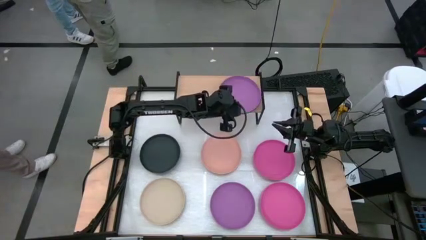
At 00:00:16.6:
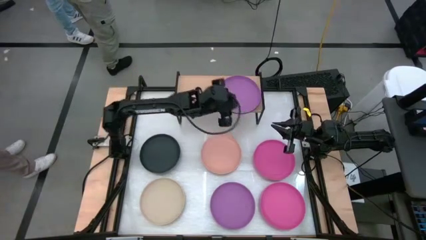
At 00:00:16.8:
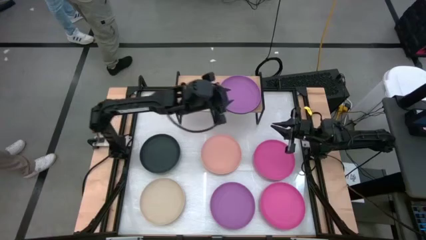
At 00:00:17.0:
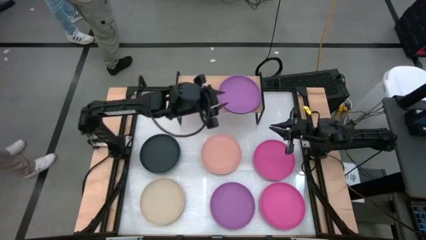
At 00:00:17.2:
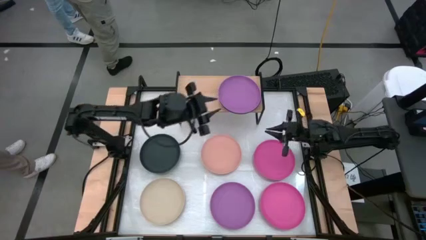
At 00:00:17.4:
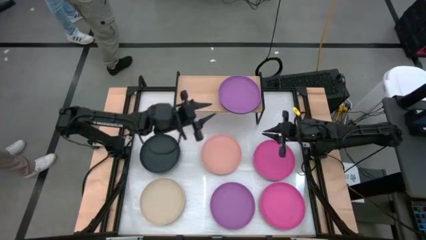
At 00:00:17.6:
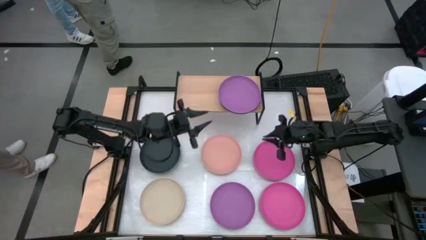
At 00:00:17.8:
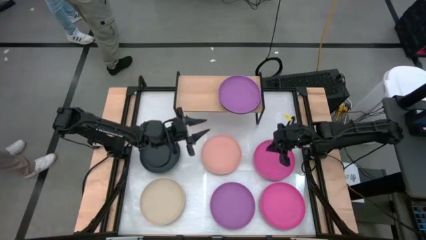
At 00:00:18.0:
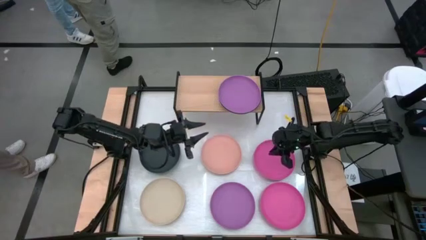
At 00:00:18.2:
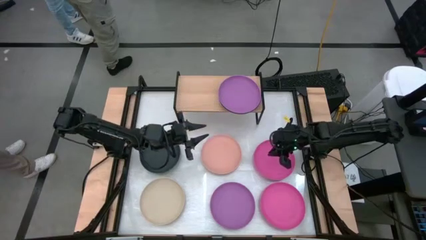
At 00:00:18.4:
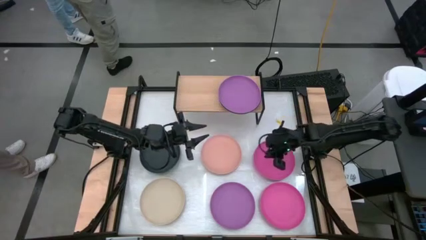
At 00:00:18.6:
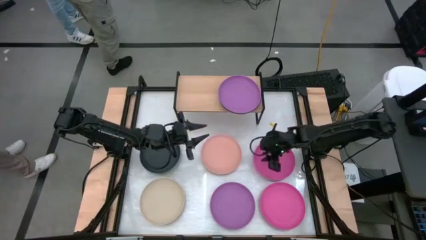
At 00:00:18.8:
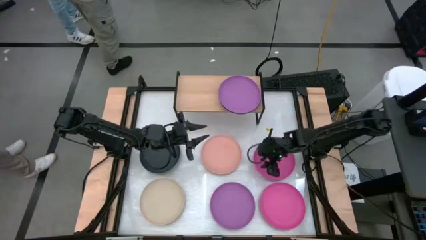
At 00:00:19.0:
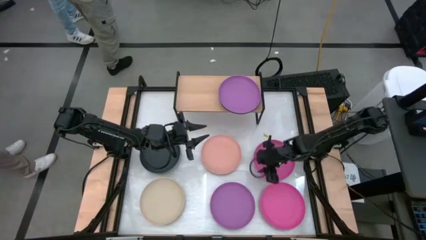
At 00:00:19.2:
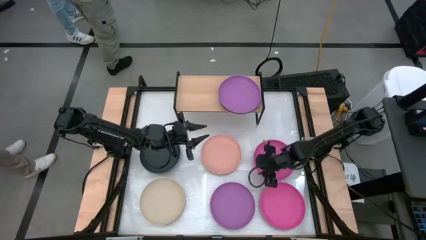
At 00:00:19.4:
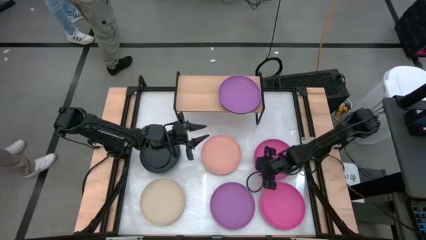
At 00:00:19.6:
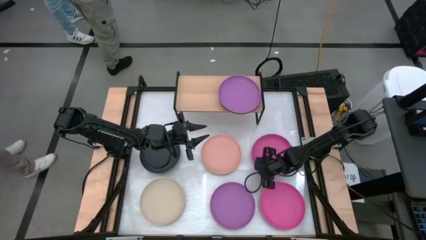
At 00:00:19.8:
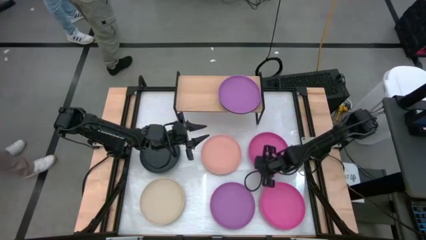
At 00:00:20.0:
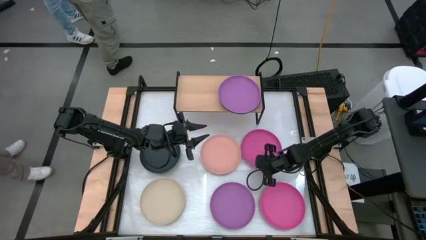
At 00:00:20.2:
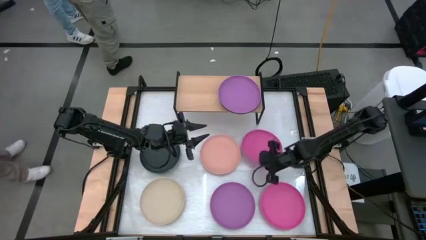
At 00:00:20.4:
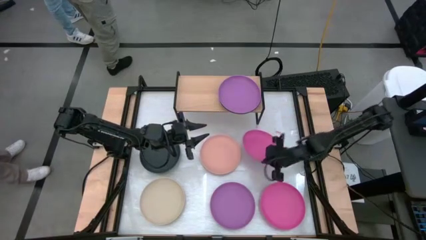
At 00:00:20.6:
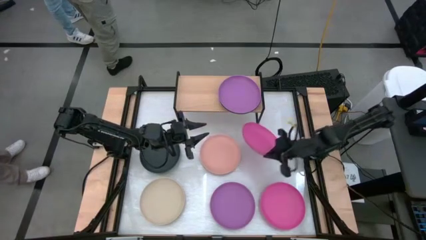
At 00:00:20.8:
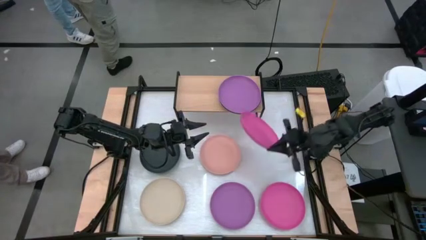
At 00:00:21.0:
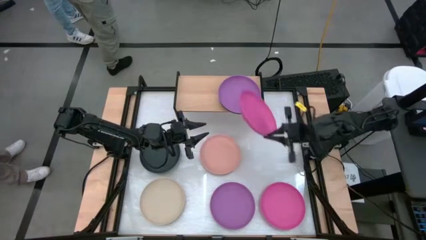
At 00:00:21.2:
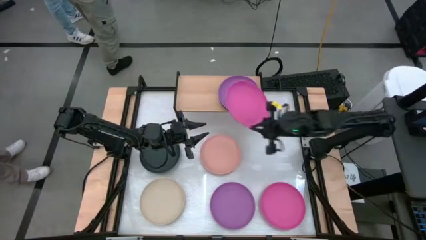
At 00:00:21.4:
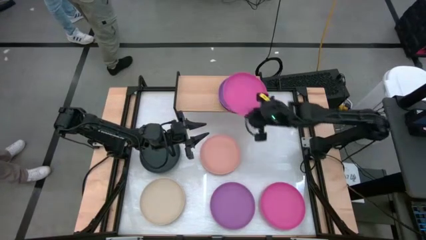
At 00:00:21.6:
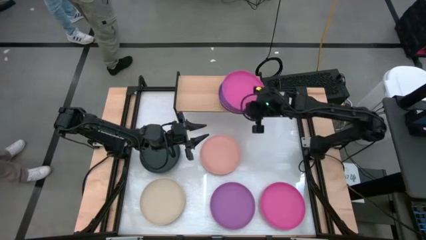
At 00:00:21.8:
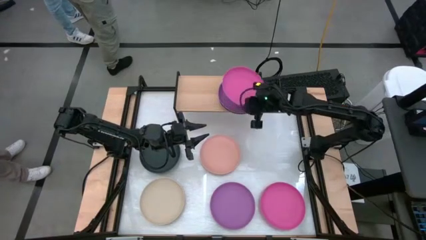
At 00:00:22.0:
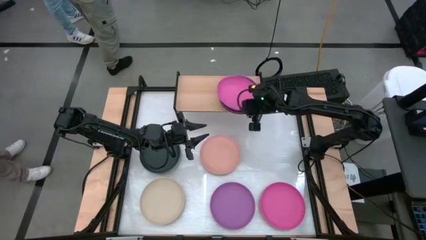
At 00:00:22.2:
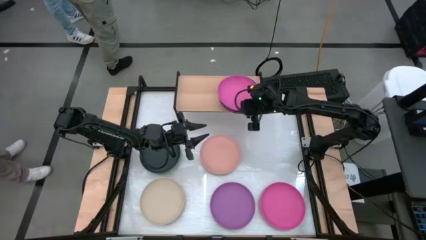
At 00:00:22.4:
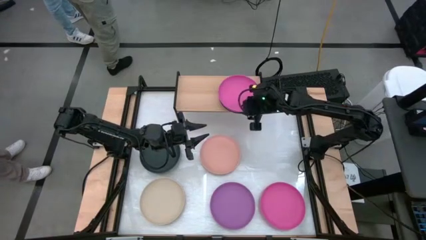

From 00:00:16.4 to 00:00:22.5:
Task: Place and stack plates onto a shelf
Stack the top pink plate on top of the purple plate on the shelf

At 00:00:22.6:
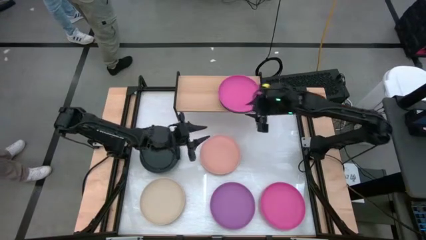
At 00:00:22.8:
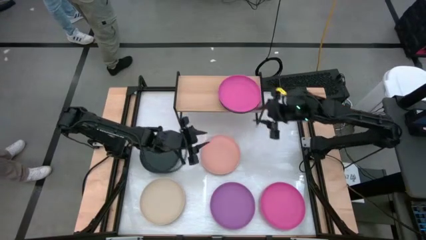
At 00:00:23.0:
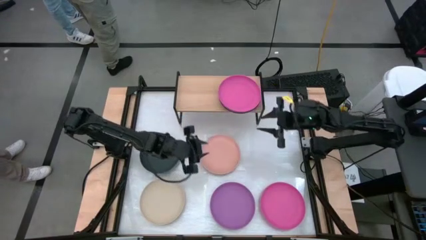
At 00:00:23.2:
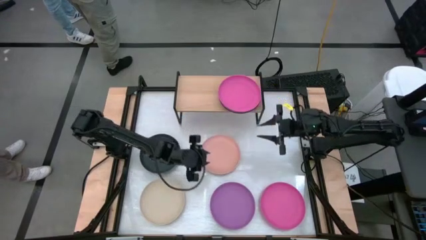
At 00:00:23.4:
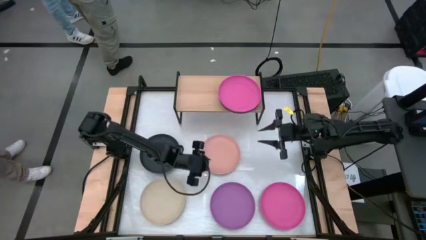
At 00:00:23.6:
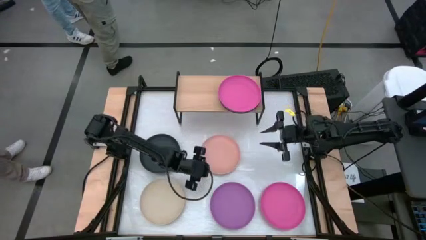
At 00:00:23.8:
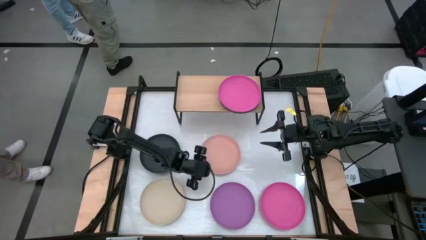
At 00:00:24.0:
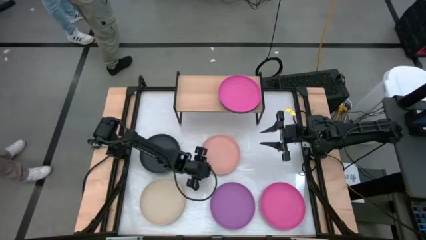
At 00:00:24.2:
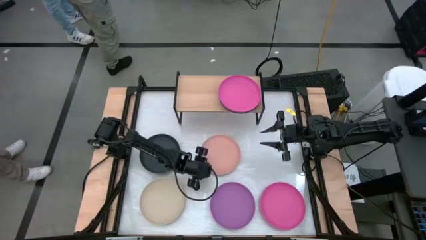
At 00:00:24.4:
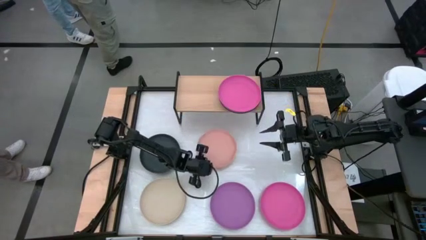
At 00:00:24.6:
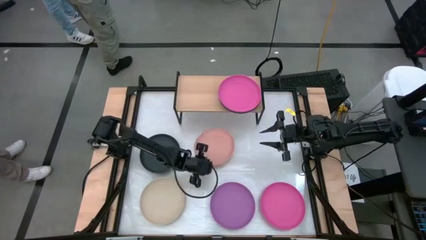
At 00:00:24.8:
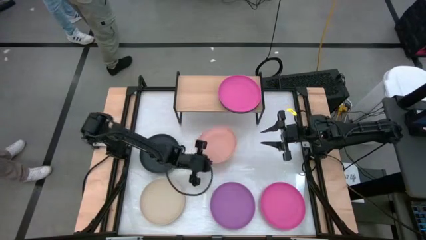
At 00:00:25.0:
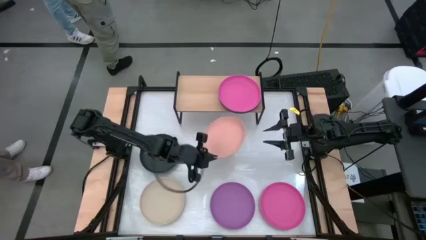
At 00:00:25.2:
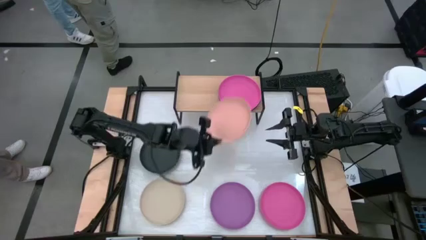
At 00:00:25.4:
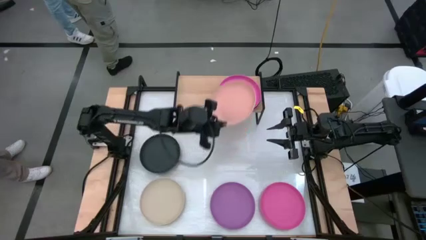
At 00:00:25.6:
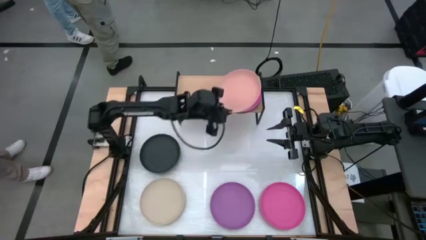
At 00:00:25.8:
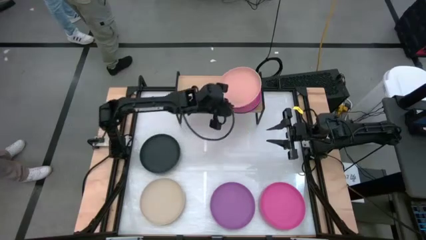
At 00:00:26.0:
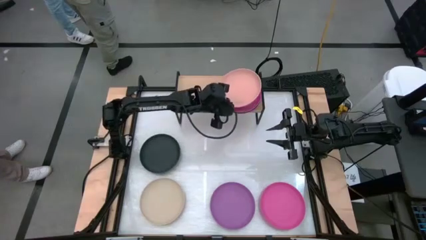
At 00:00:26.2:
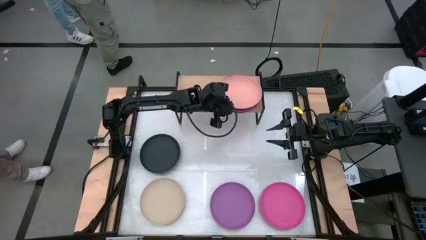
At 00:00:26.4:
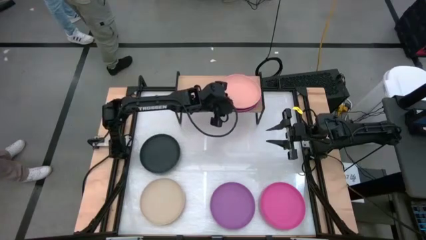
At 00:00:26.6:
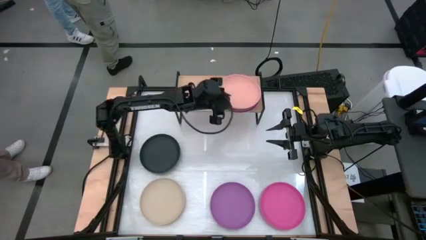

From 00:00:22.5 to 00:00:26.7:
Stack the light pink plate on top of the pink plate on the shelf

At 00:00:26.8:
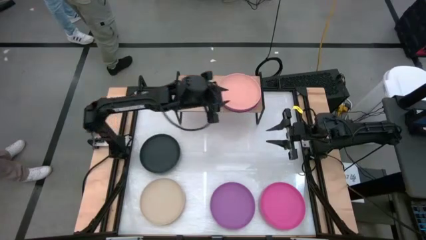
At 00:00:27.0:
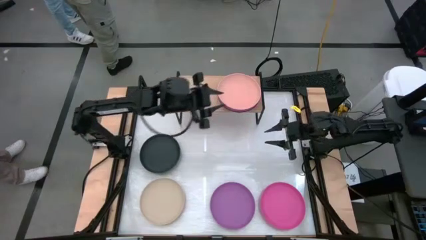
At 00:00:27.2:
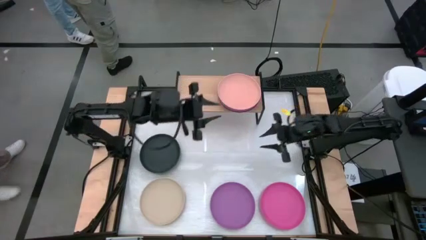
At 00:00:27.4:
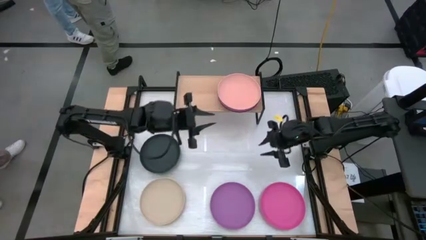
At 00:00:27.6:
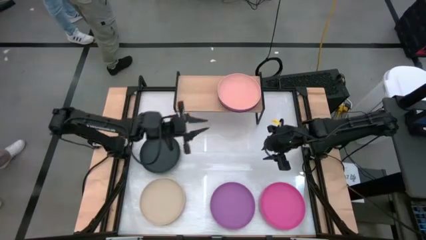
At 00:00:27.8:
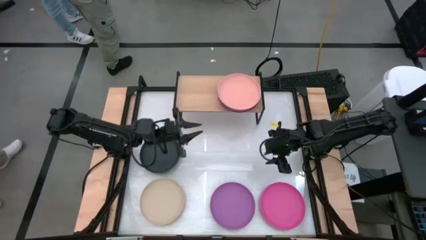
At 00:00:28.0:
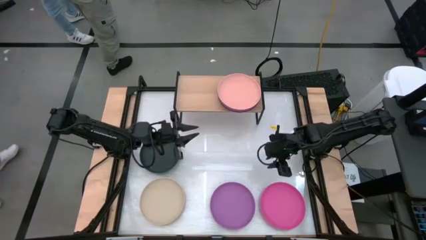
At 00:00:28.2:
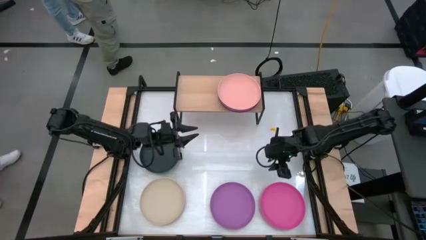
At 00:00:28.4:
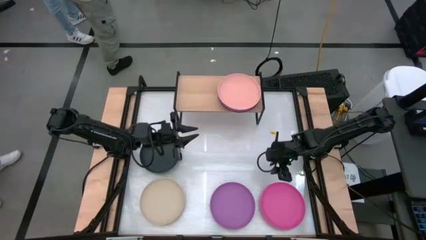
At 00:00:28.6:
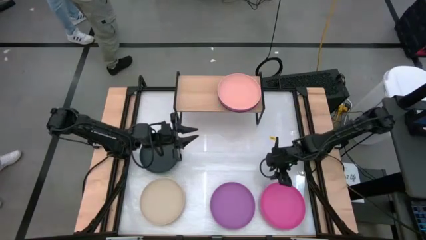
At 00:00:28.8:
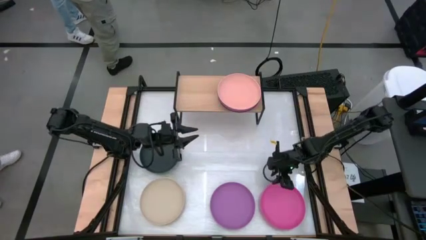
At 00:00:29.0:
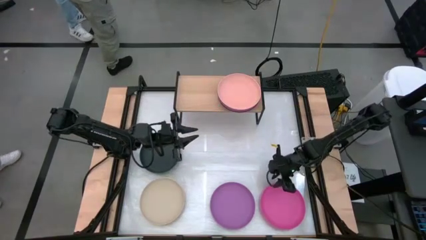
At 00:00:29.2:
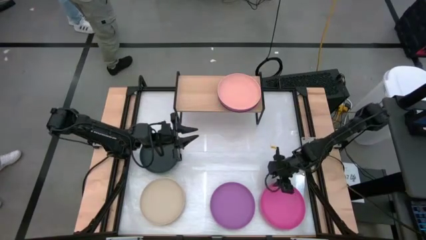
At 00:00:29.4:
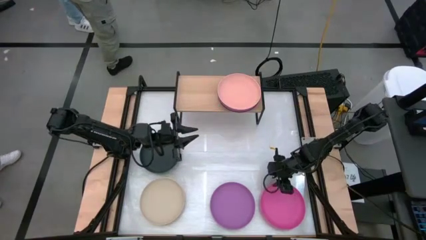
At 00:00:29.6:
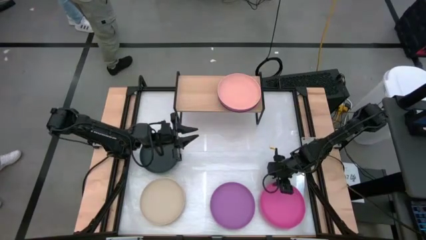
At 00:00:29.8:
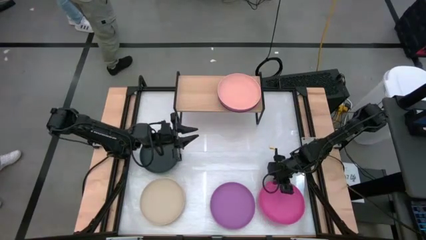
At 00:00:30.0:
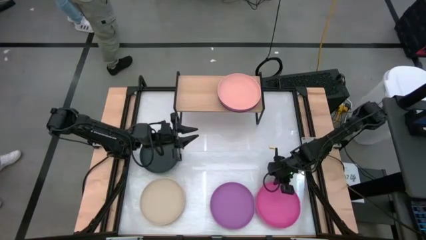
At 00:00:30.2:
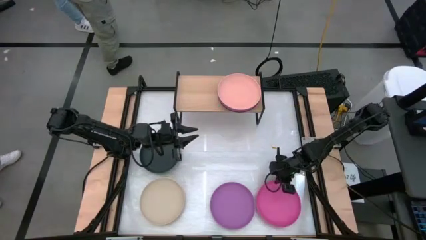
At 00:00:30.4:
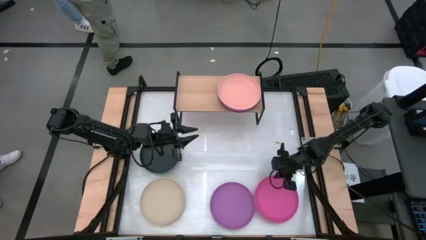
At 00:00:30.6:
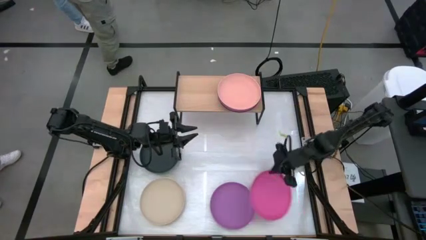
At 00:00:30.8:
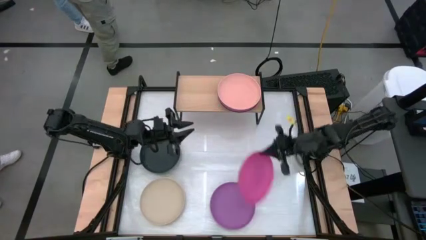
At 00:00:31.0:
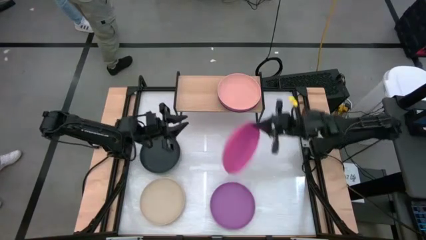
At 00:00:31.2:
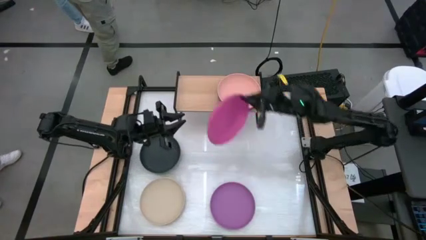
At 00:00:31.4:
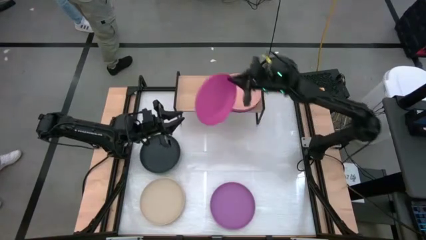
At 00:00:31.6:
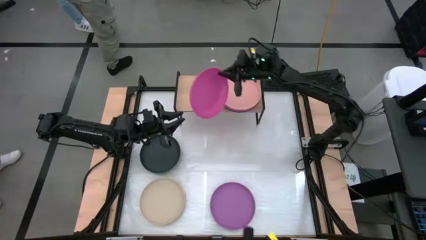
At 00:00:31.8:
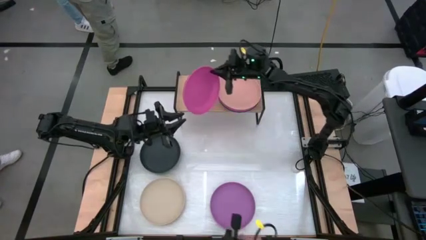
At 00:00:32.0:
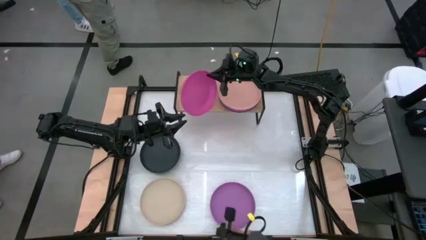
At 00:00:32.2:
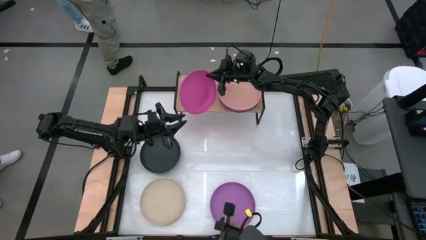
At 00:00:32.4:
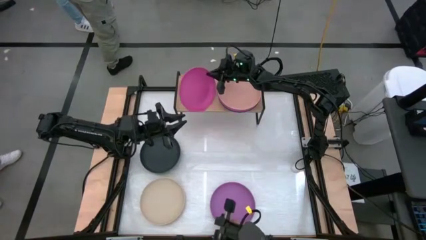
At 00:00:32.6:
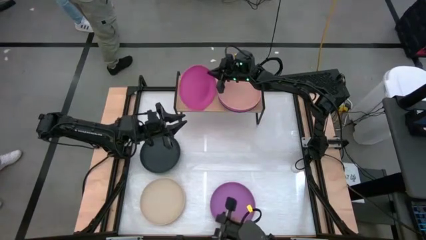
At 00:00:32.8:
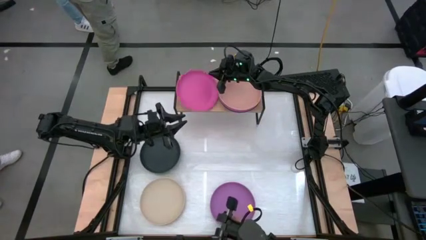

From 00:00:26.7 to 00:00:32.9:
Put the pink plate on the shelf
